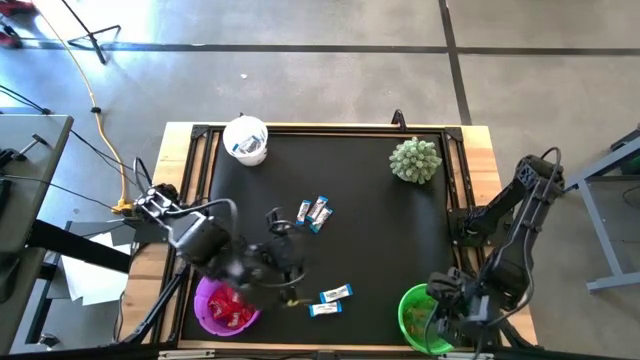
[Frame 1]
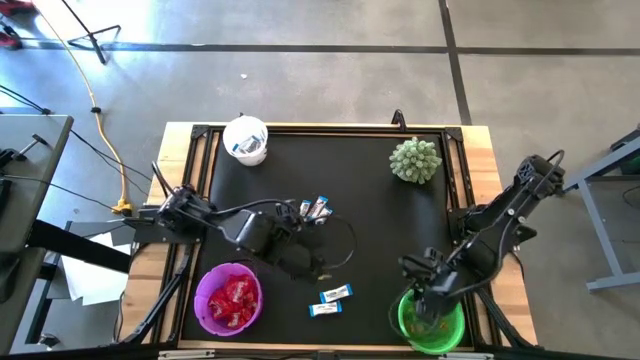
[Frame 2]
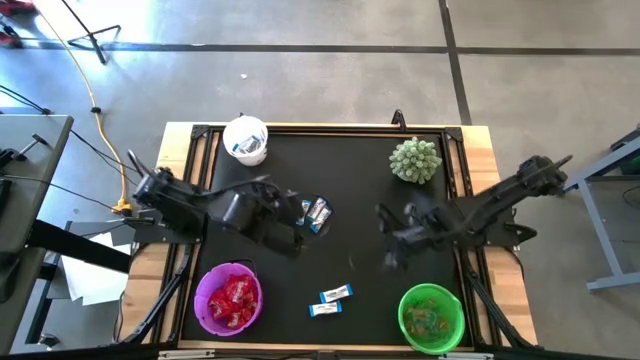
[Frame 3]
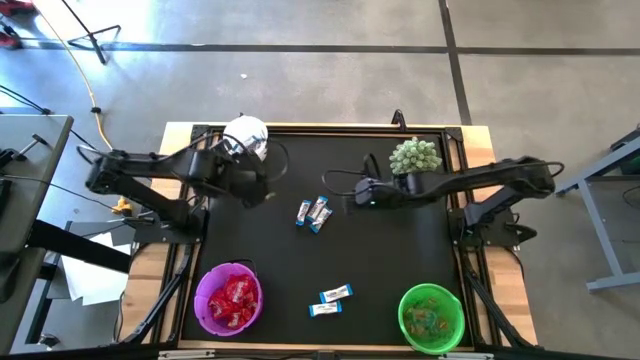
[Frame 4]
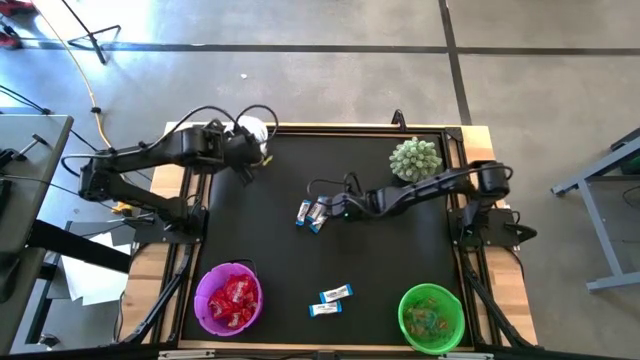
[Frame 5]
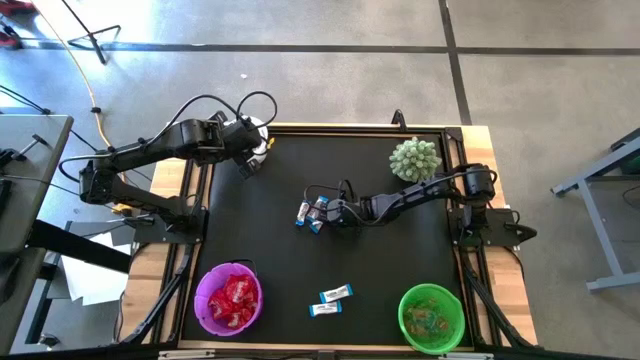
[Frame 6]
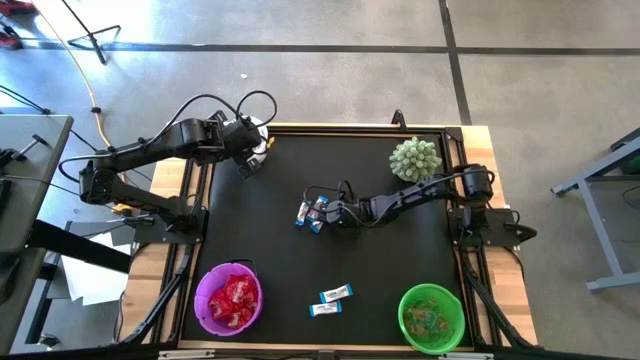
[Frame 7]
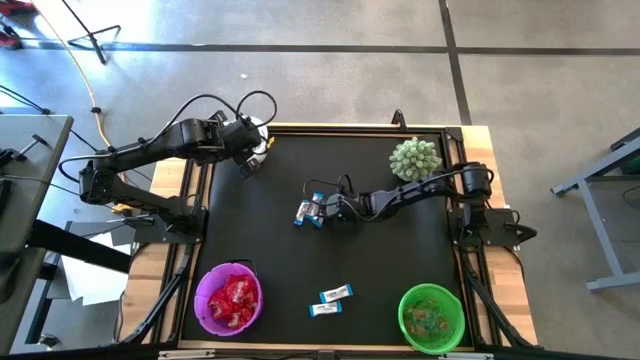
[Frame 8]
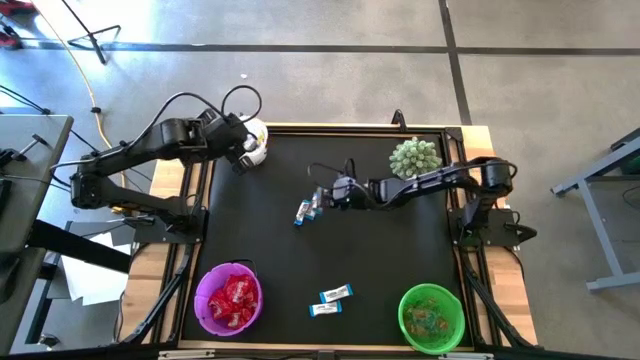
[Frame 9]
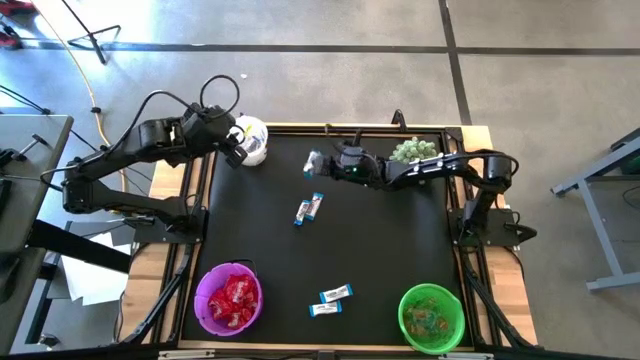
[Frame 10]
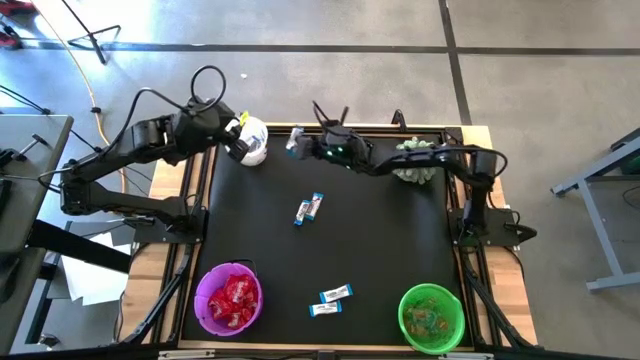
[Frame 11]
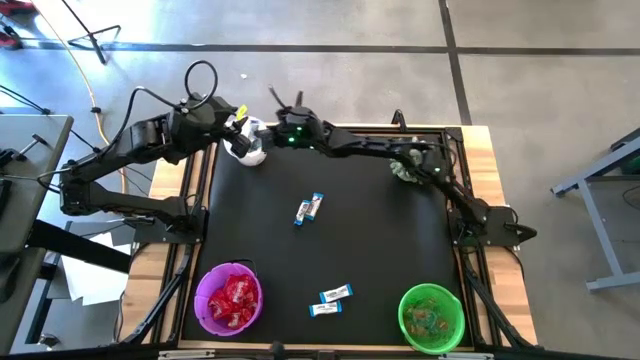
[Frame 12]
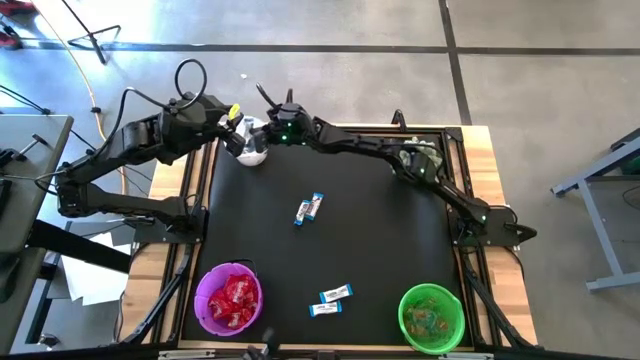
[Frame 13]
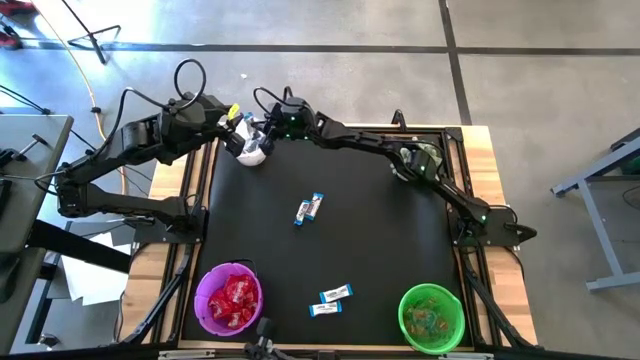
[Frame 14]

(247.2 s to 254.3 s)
Task: Sort candy
Put the white chocolate into the white bucket

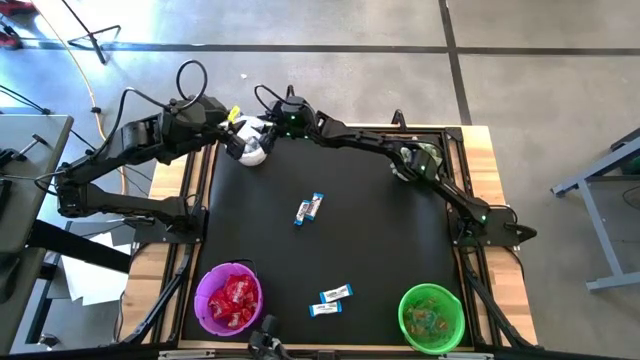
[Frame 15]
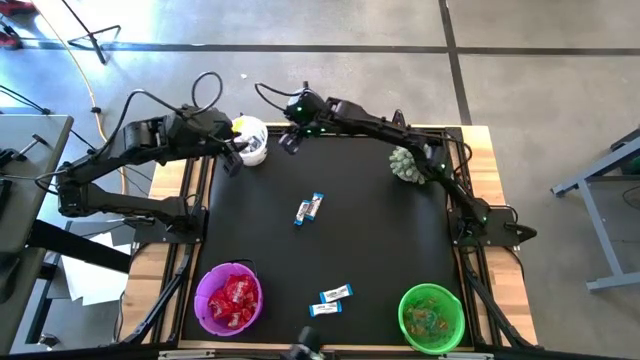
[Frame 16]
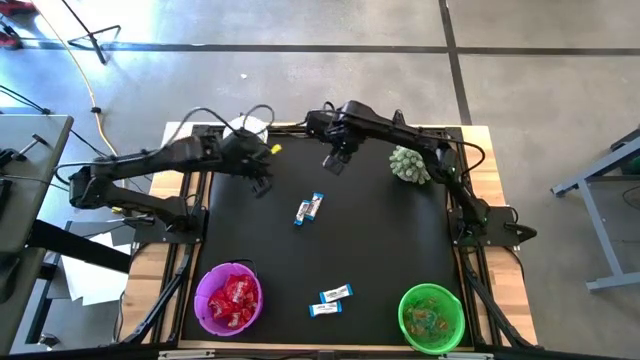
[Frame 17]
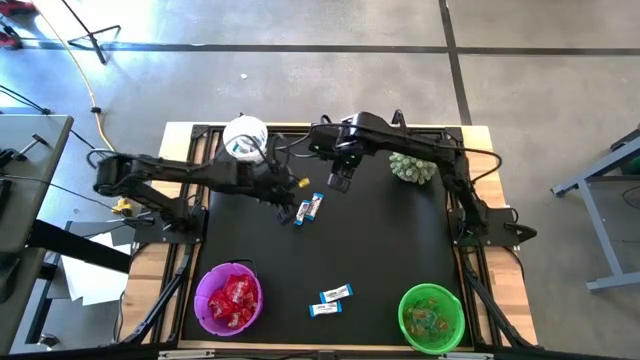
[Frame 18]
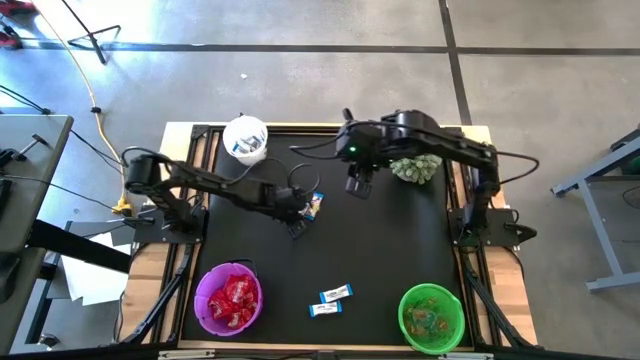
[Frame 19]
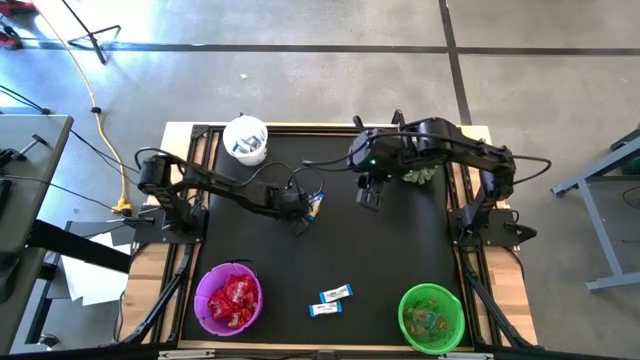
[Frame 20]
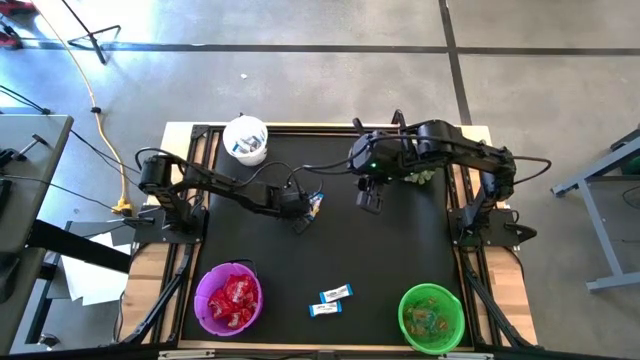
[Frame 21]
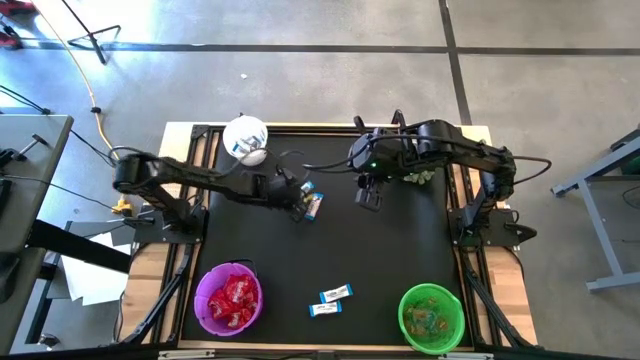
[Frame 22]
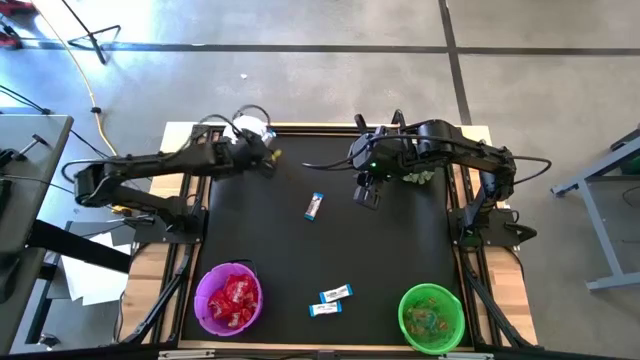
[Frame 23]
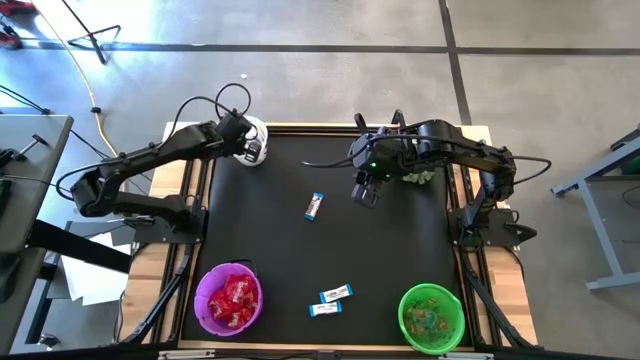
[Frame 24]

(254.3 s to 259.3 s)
Put the white chocolate into the white bucket

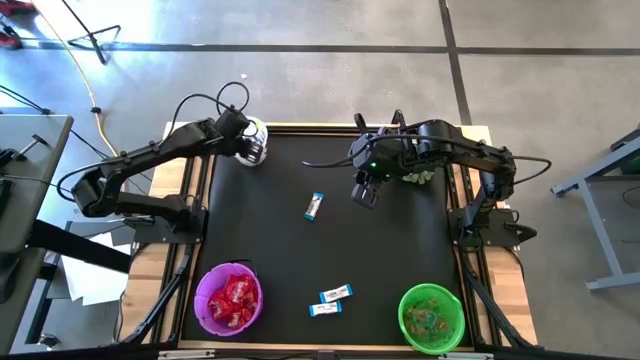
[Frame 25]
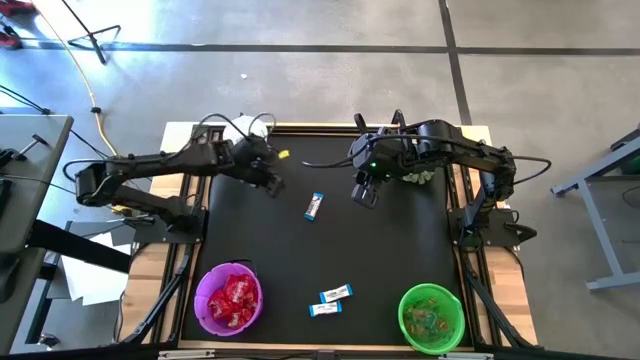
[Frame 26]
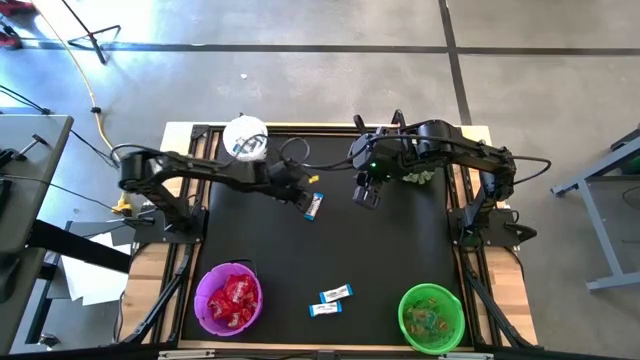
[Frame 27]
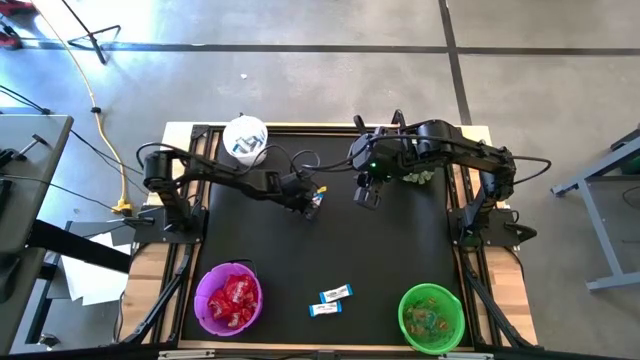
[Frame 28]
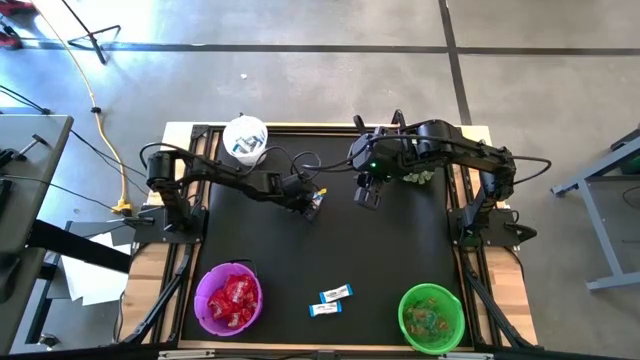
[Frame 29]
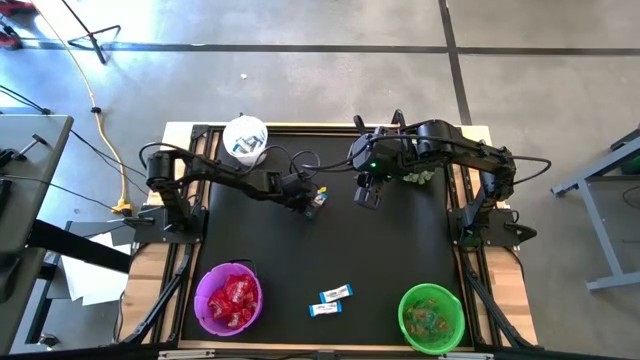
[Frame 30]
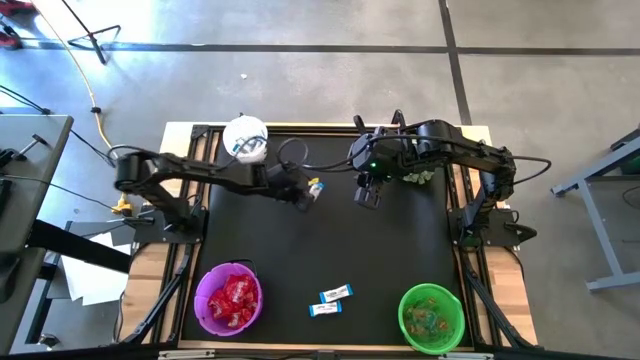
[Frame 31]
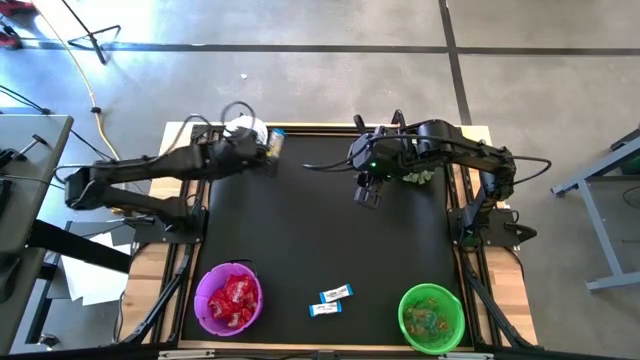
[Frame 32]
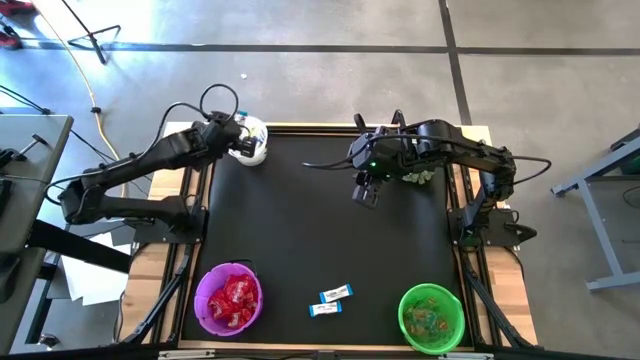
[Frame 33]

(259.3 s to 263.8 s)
Put the white chocolate into the white bucket

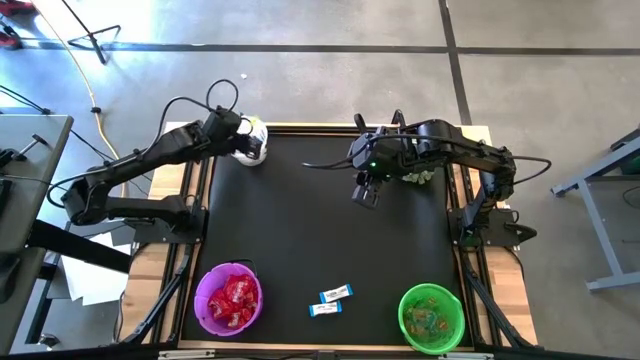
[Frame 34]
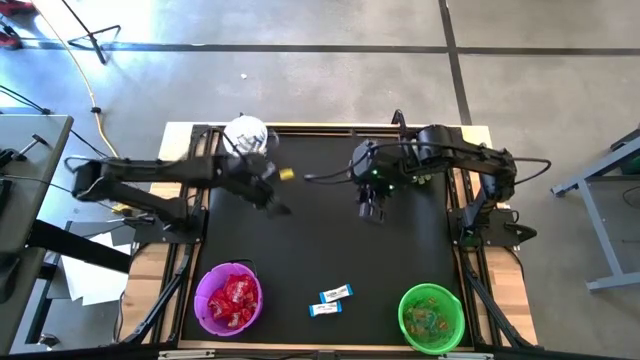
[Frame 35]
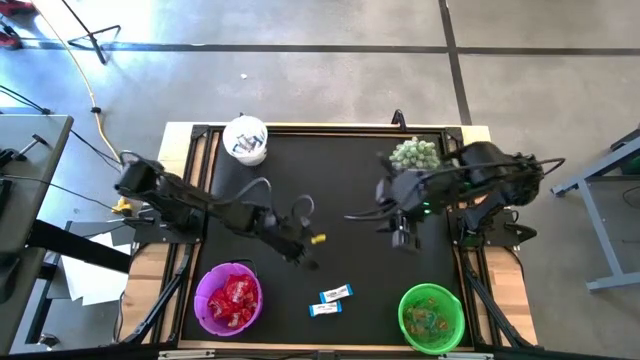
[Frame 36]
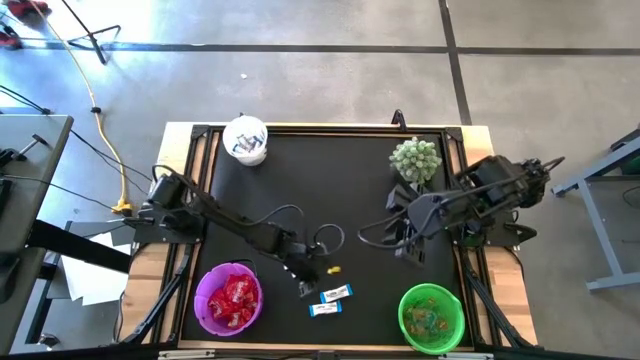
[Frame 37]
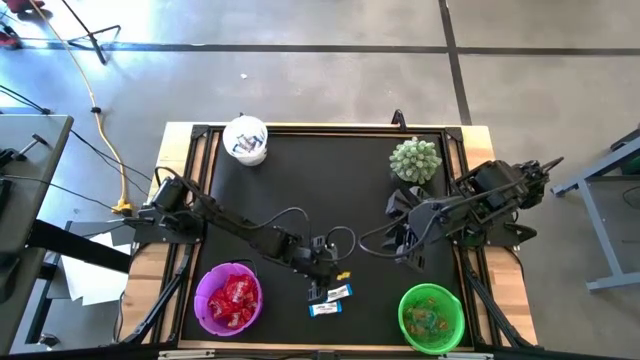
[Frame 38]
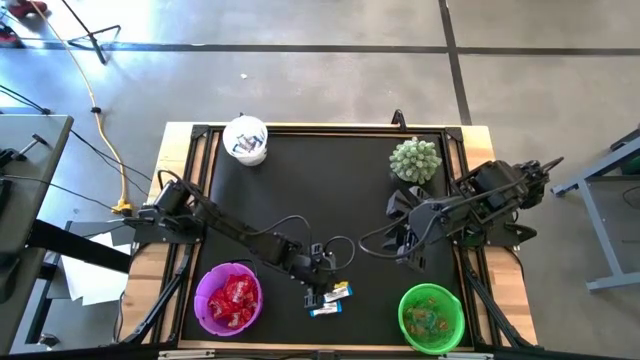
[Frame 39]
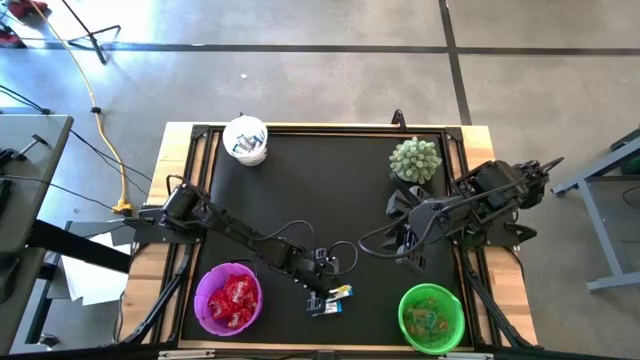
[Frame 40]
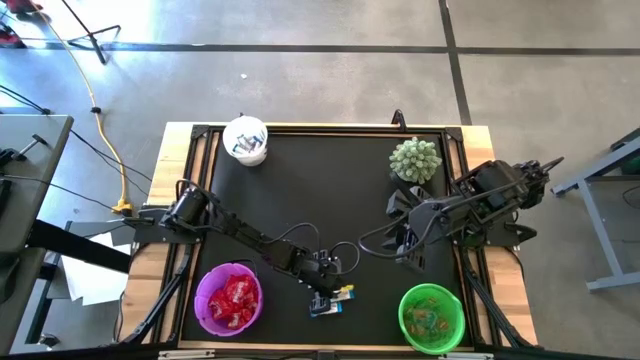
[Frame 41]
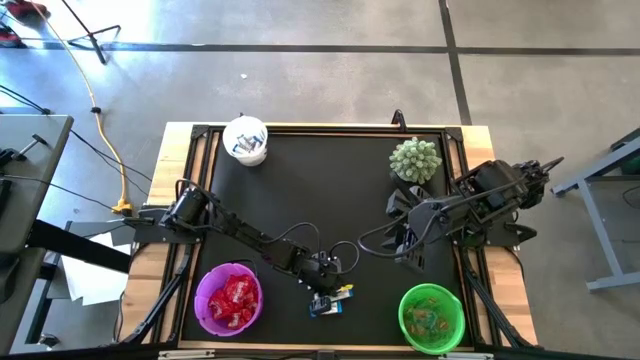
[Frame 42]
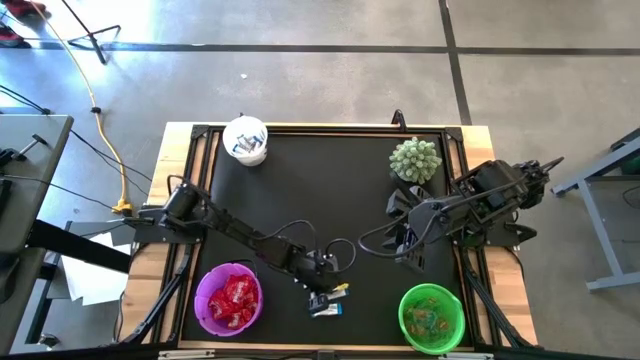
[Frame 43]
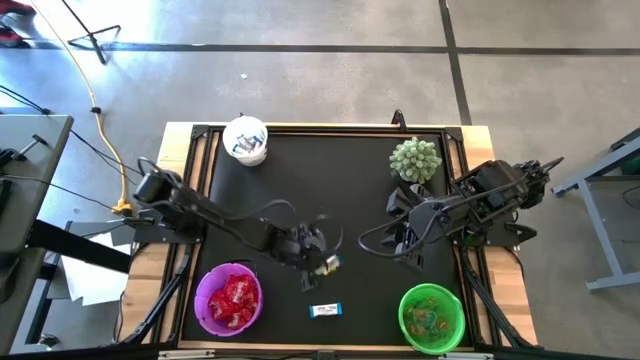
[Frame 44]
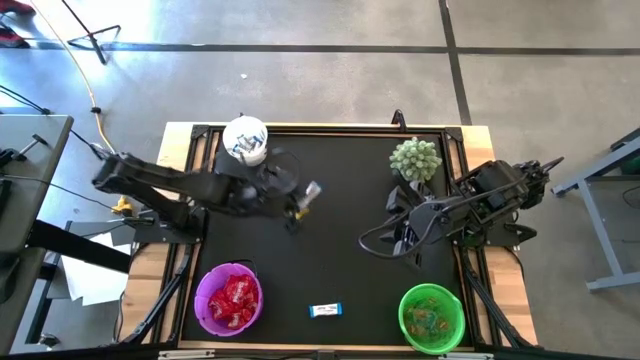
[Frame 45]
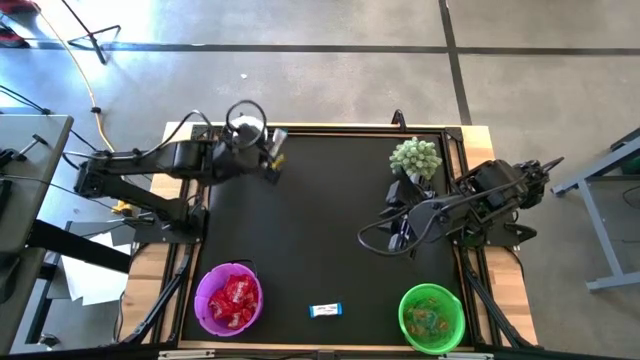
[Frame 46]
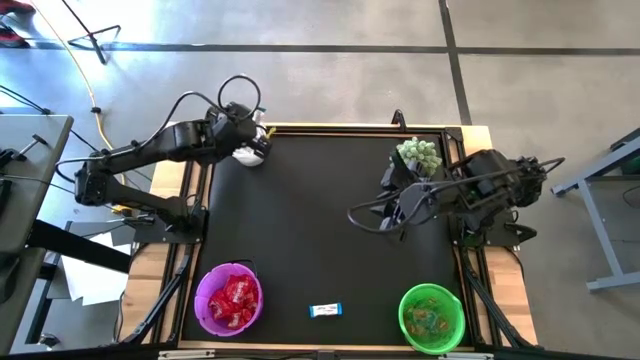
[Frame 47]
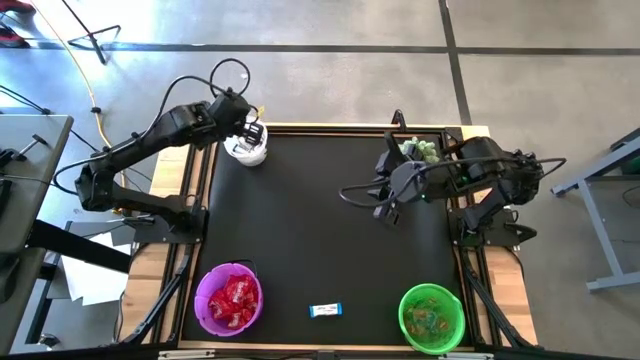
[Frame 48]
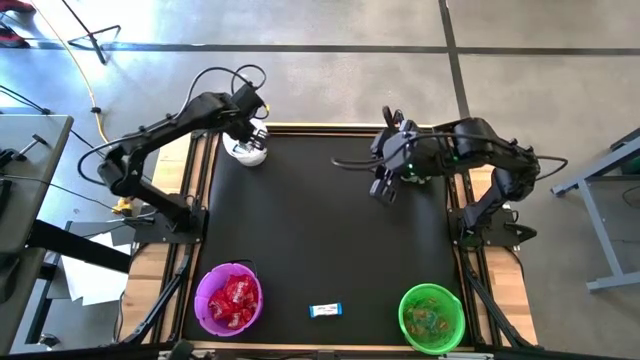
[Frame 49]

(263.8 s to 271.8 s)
Put the white chocolate into the white bucket
